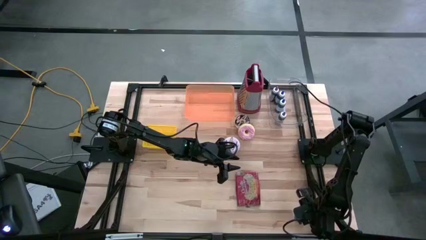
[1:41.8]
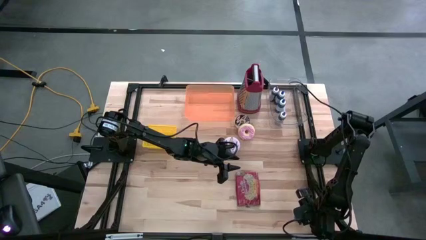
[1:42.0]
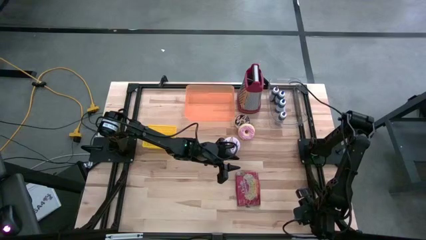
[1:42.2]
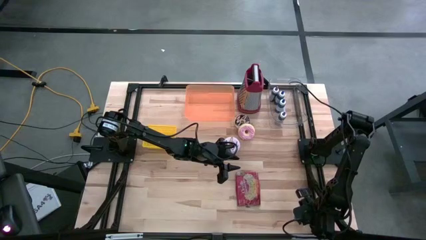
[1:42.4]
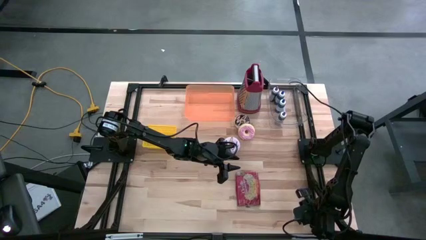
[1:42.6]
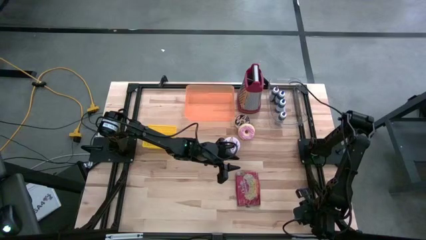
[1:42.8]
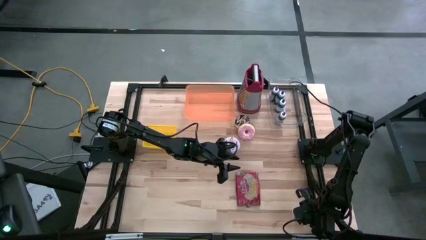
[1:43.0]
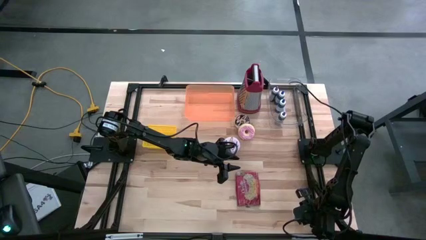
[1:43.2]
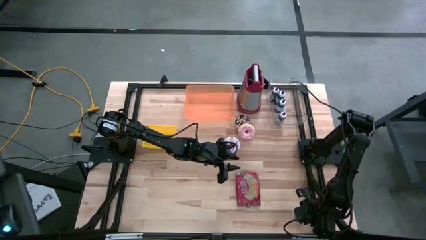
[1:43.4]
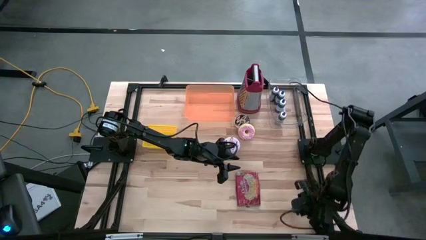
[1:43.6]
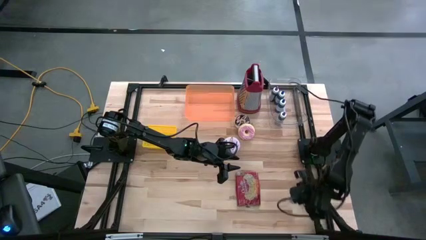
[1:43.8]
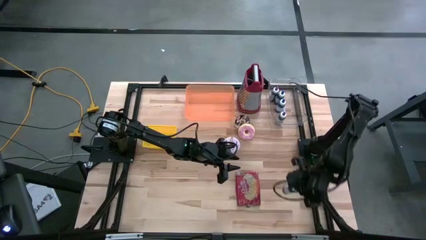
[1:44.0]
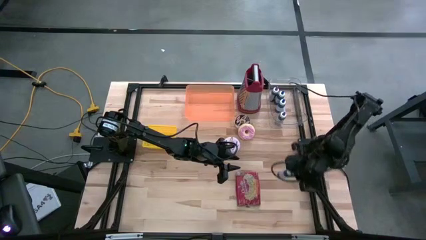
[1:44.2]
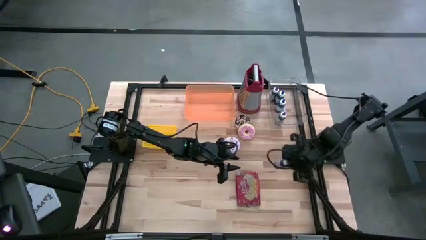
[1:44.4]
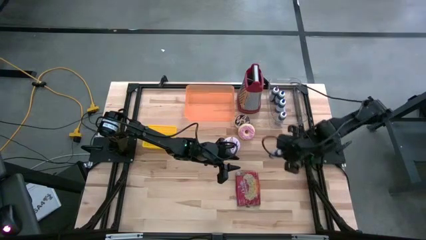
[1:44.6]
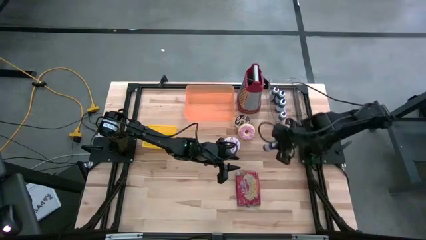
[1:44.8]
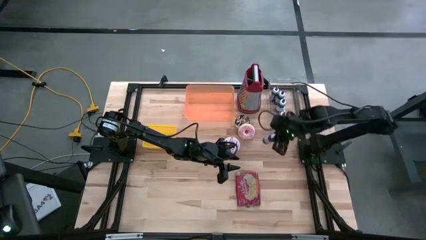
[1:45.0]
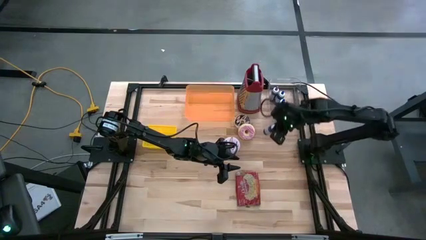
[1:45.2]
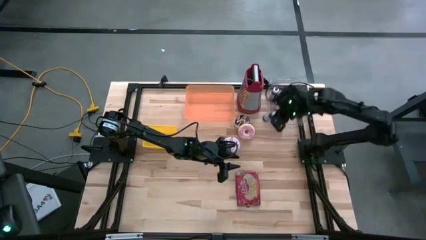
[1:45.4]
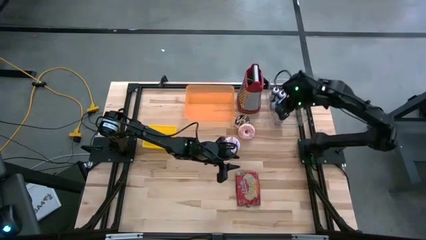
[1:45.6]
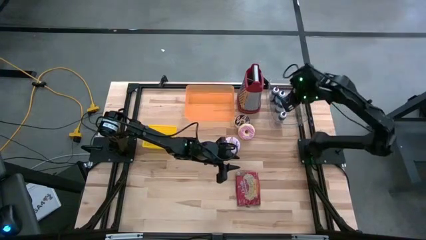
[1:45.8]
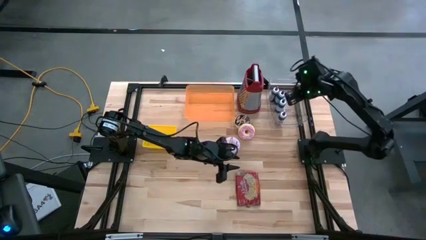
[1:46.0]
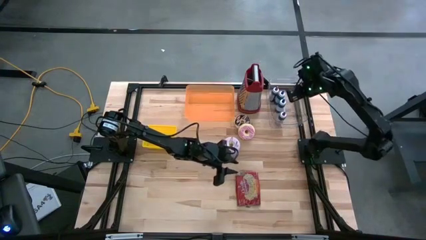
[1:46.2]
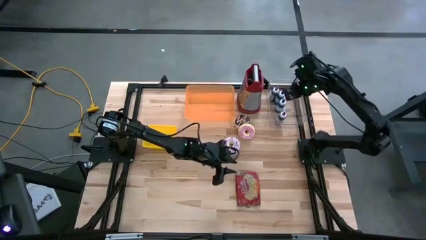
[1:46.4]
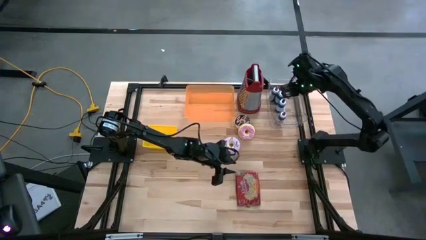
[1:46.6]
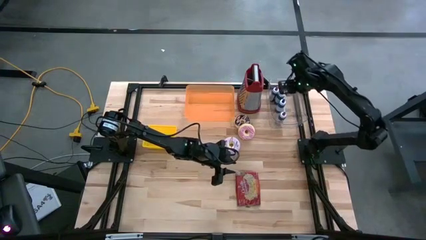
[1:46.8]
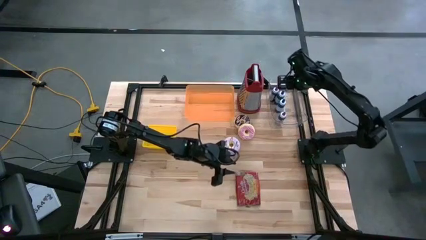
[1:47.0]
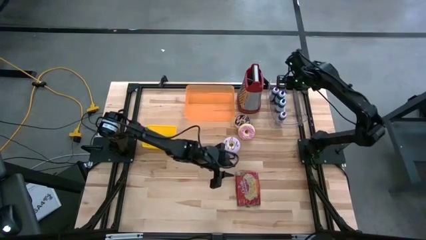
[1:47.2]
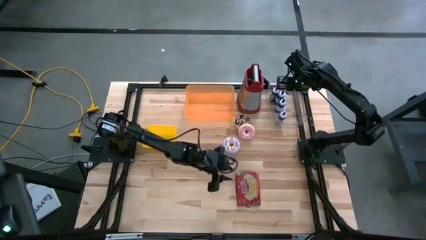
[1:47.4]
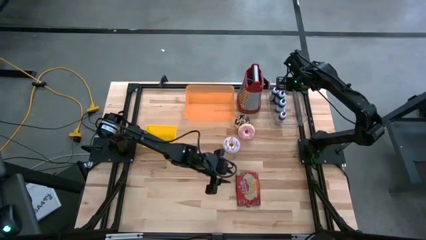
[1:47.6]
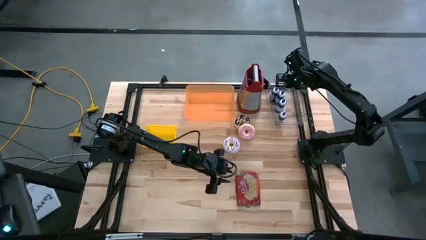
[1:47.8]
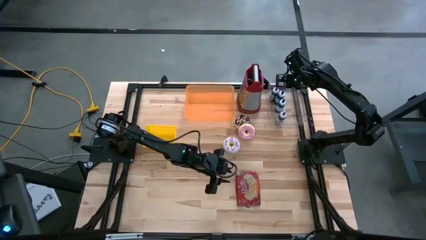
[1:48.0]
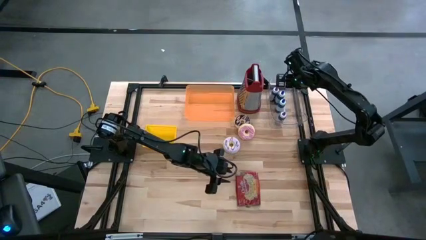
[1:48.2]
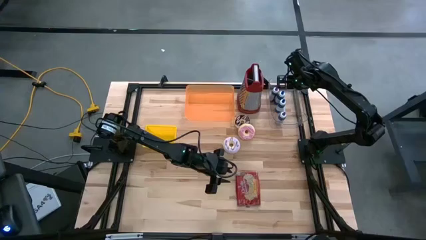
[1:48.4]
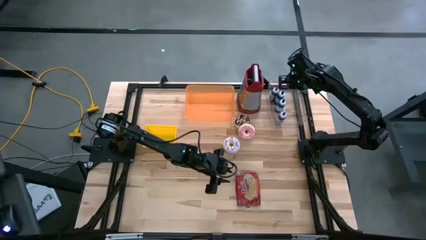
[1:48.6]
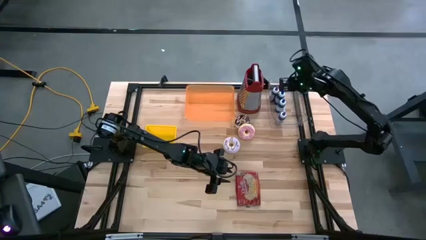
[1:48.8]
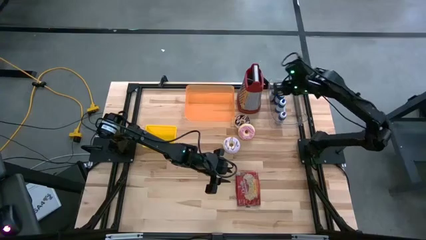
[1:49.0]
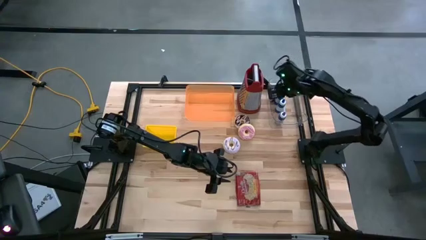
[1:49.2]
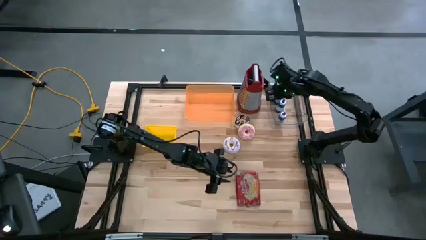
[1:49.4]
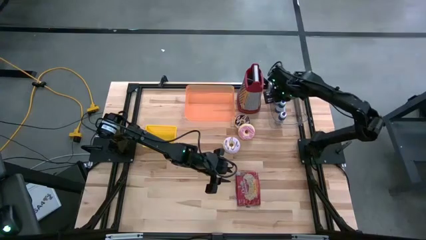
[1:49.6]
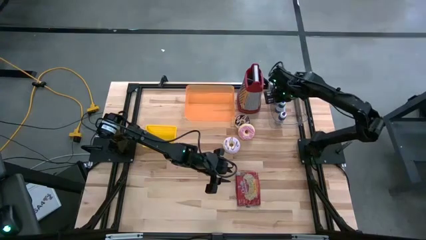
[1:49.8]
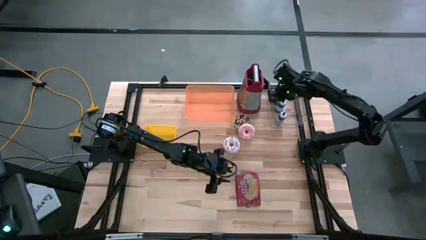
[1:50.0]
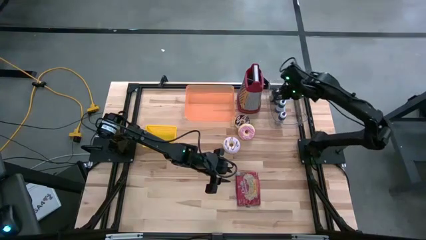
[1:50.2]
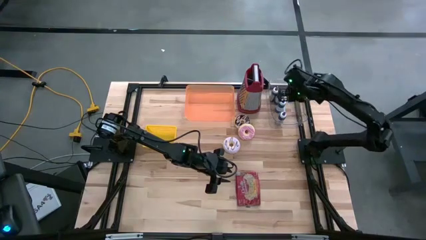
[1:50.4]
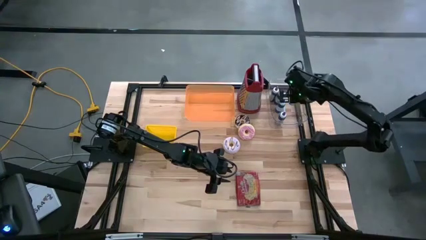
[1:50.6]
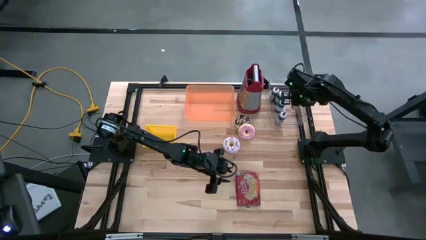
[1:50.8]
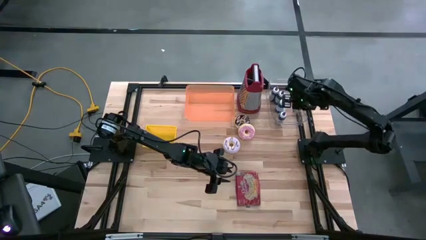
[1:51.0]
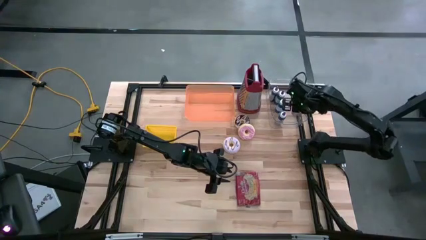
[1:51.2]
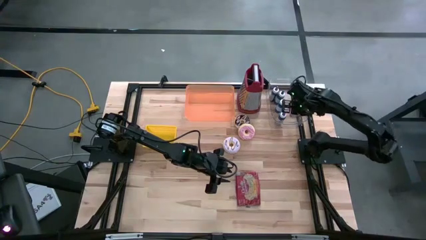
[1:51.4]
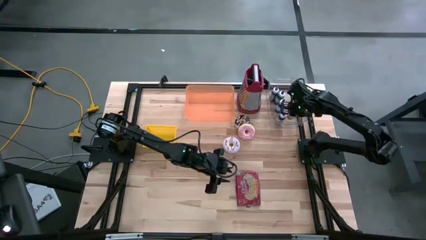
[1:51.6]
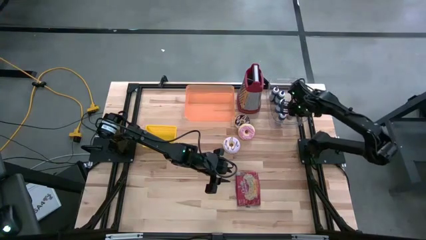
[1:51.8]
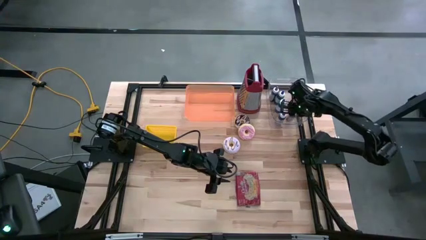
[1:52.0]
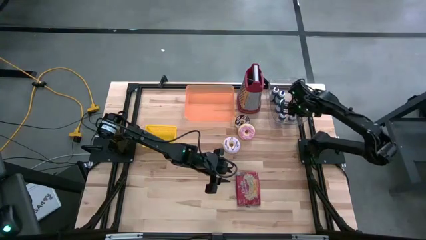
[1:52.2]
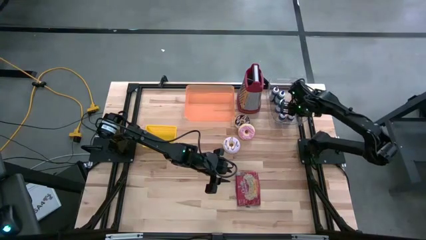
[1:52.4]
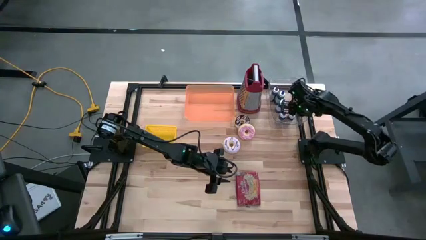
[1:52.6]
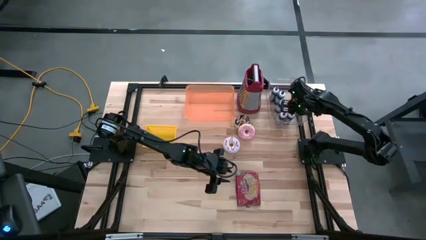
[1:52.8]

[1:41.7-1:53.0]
Task: Pick & Place Food Item
Put the blue food coloring bottle into the transparent bin

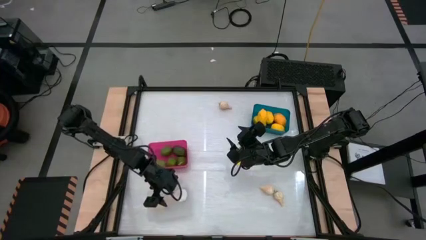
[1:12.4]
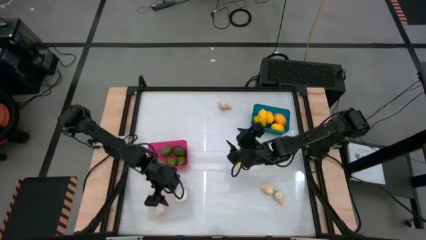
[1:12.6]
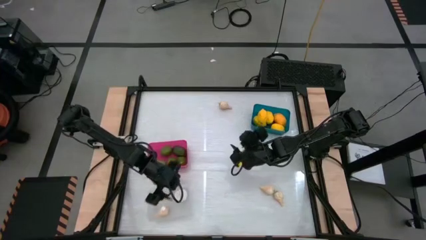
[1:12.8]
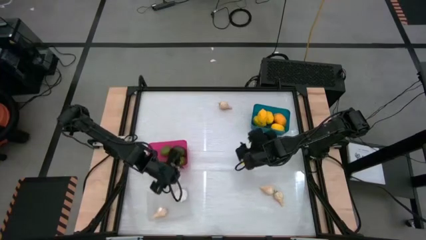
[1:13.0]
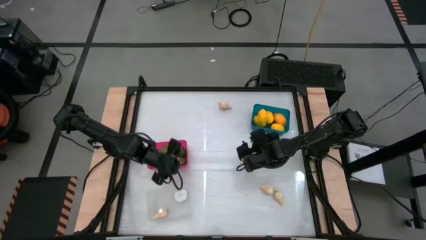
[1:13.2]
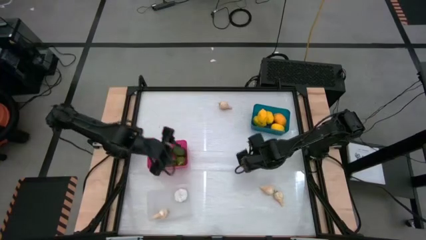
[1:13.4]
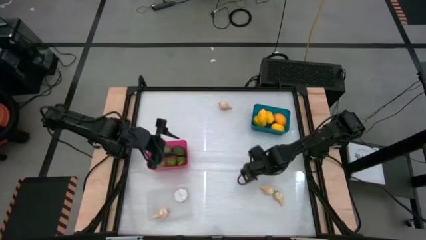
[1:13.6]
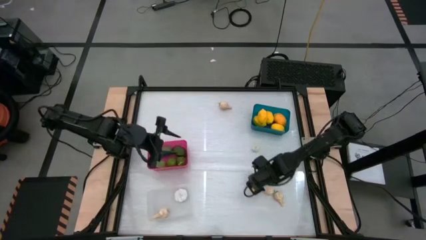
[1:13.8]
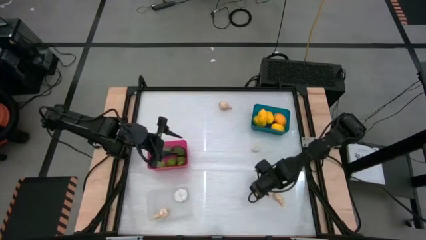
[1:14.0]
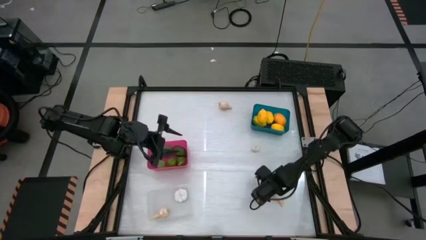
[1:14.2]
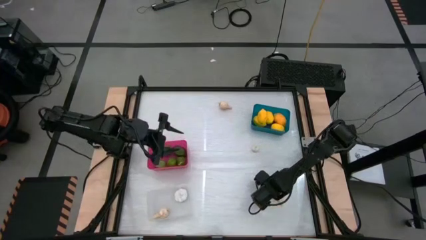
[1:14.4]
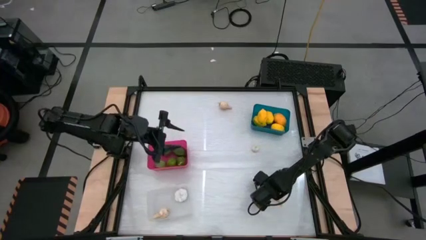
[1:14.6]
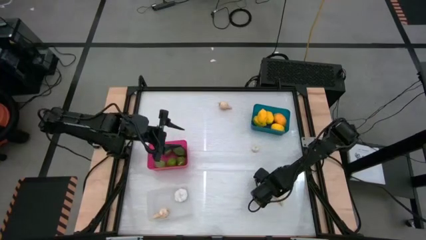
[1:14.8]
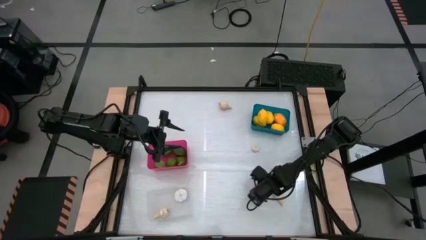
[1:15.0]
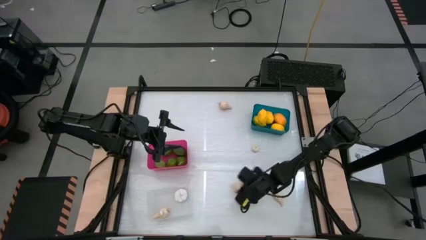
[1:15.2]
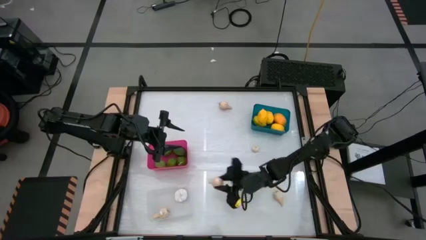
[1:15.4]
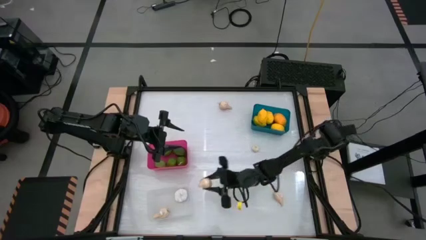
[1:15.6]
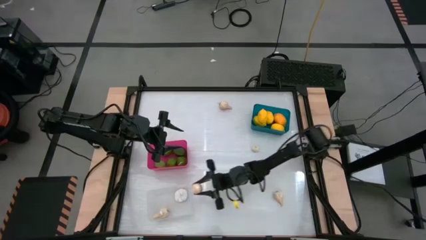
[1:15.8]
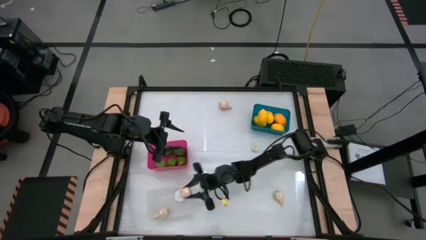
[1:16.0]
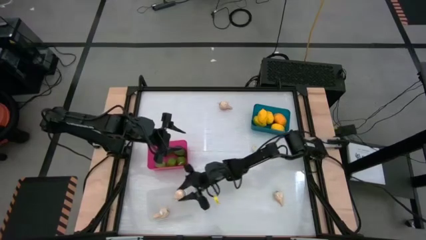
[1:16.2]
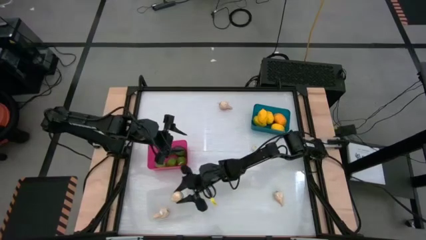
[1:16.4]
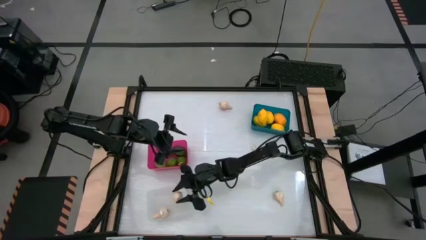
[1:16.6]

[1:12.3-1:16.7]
Task: Sort produce into baskets
Put the garlic into the white bin

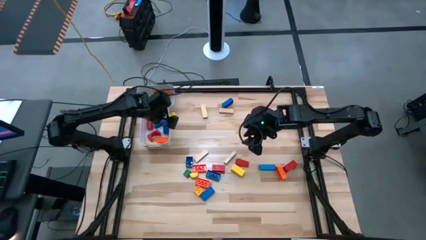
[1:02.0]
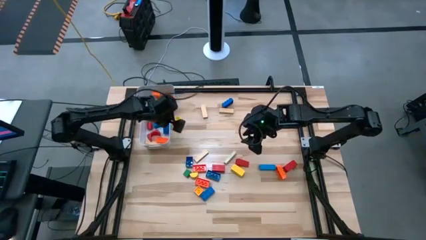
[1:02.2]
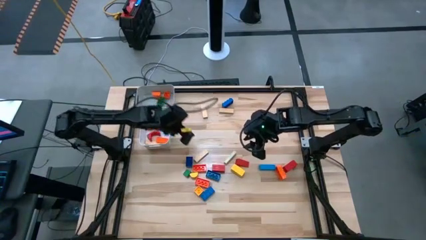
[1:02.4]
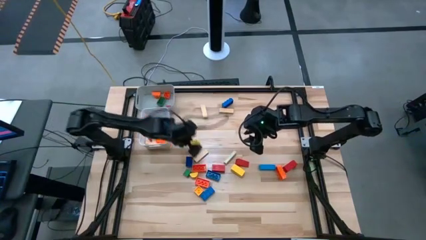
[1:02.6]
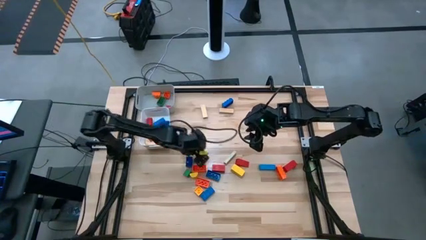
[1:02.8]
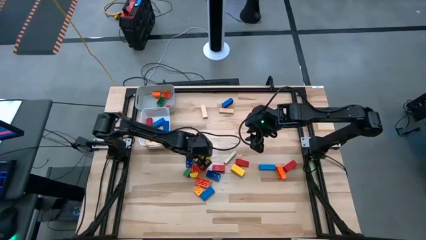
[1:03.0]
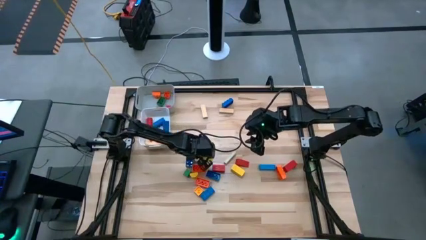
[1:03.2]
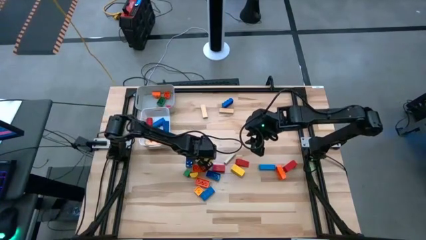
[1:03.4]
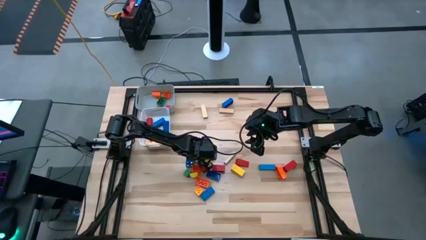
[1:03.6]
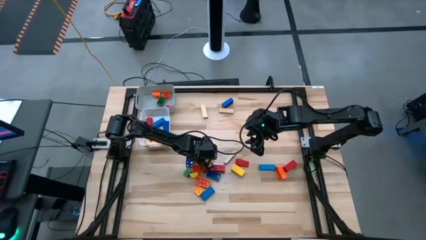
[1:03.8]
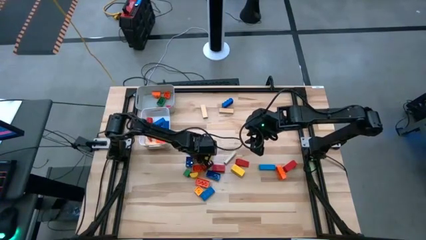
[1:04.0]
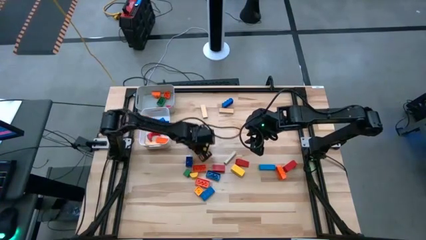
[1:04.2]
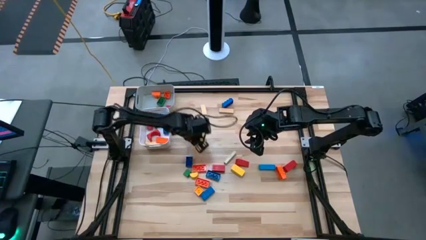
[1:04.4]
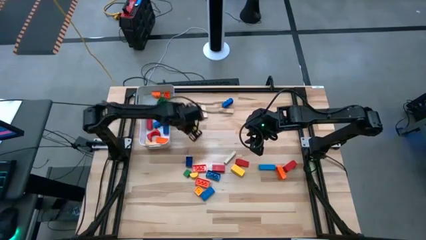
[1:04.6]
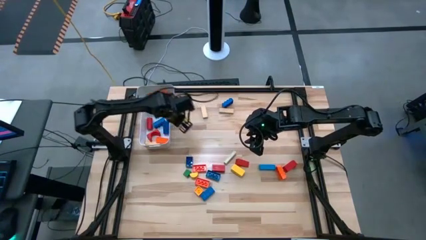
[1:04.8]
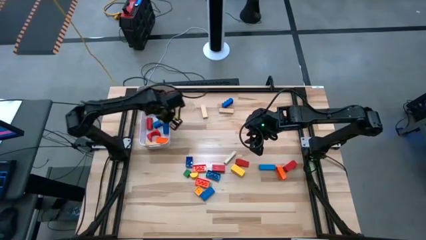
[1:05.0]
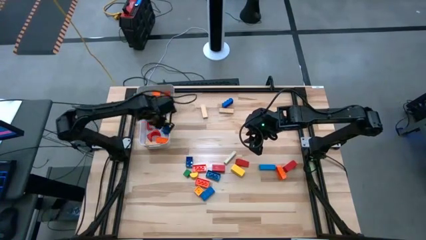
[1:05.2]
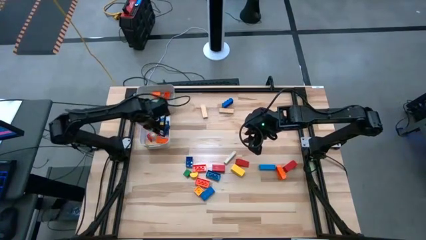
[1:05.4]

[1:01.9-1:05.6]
Task: Sort blocks by size
Put the large brown wooden block into the white bin
